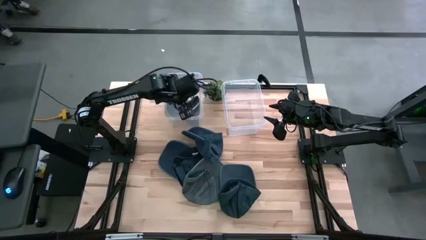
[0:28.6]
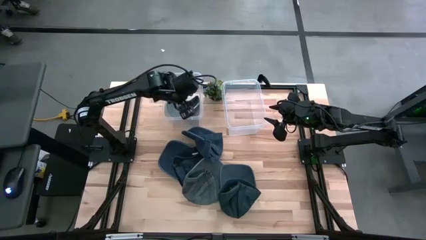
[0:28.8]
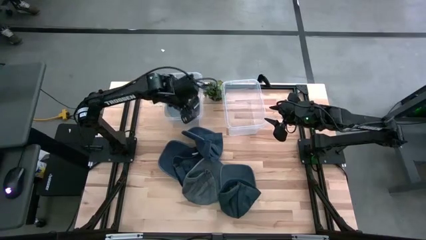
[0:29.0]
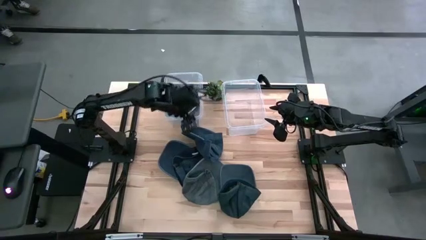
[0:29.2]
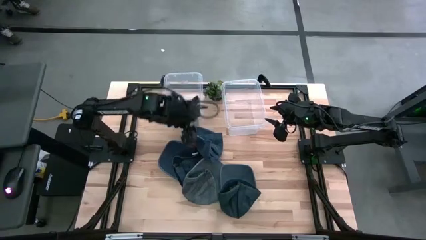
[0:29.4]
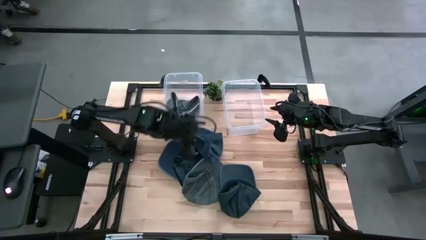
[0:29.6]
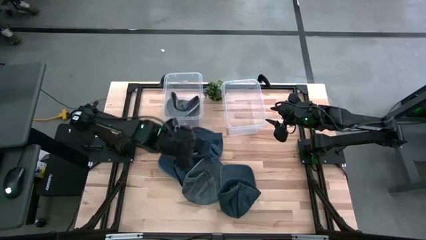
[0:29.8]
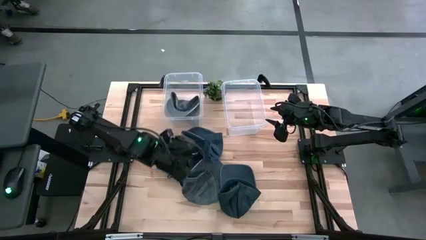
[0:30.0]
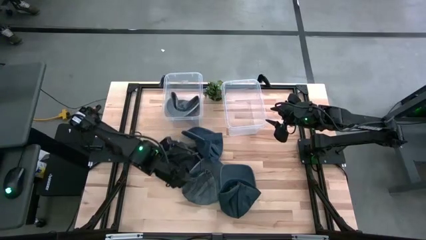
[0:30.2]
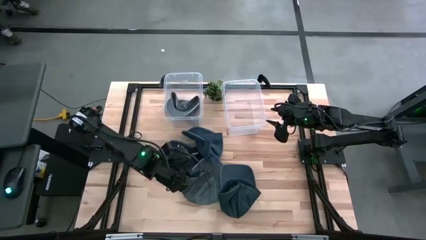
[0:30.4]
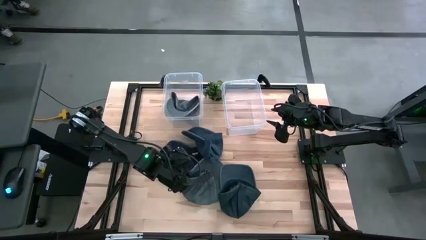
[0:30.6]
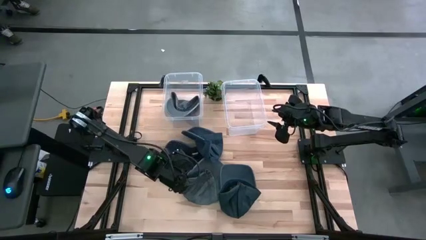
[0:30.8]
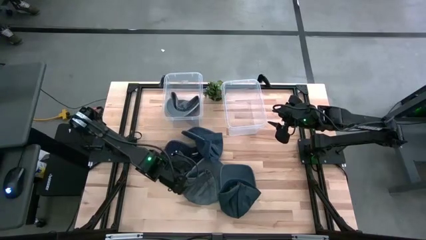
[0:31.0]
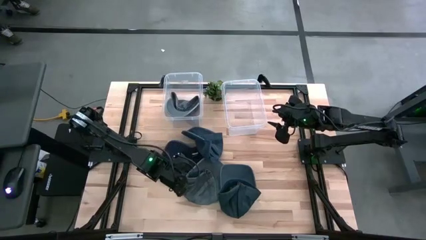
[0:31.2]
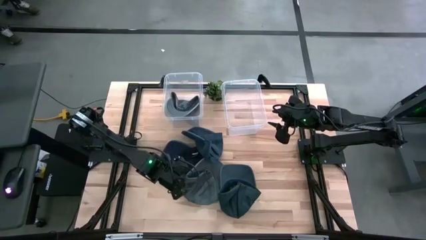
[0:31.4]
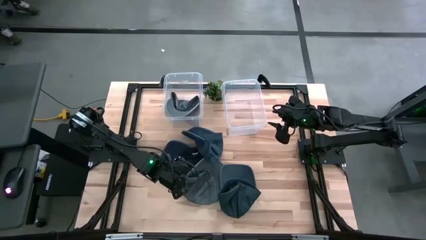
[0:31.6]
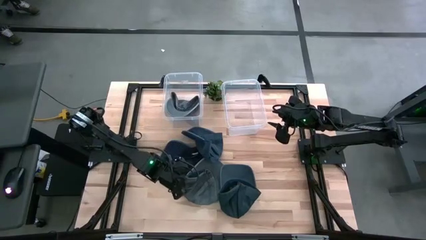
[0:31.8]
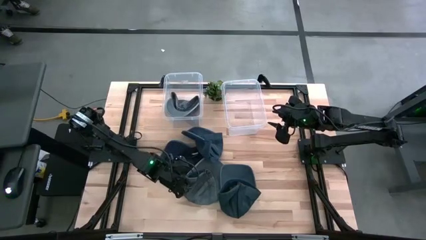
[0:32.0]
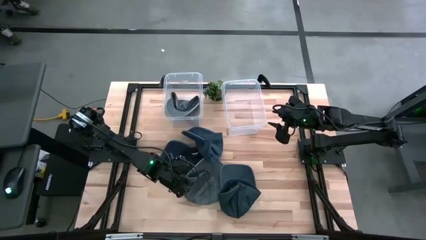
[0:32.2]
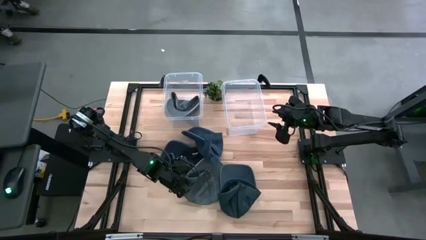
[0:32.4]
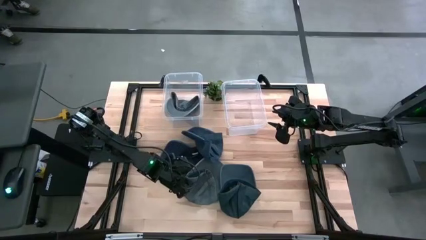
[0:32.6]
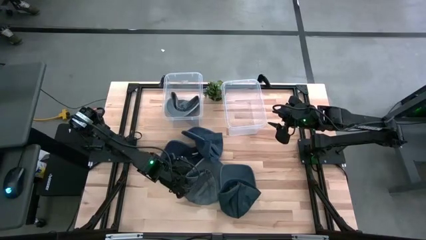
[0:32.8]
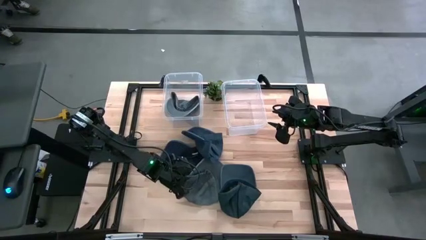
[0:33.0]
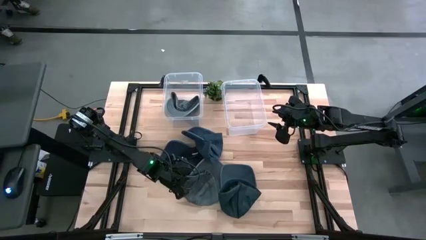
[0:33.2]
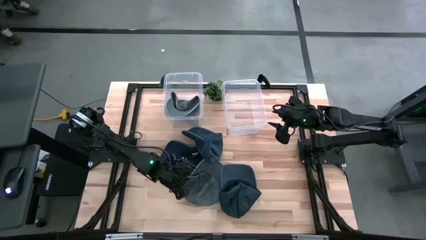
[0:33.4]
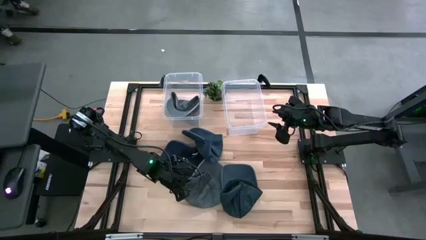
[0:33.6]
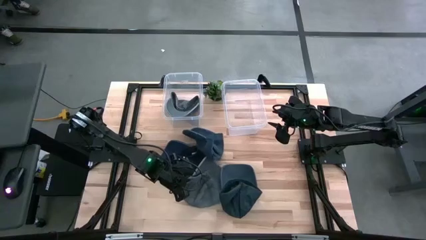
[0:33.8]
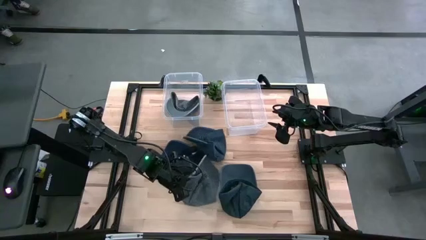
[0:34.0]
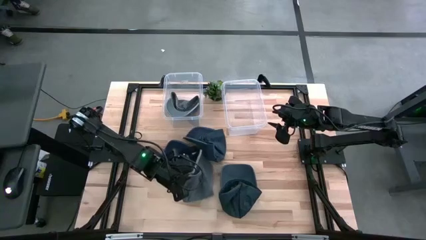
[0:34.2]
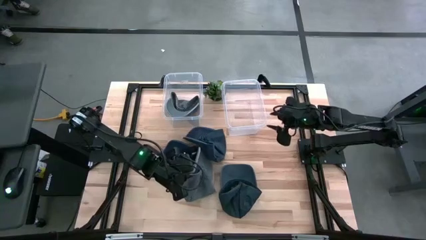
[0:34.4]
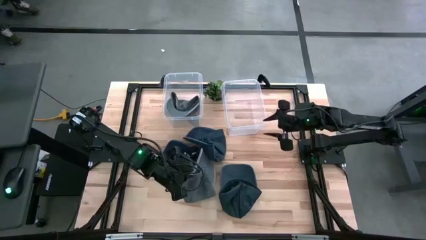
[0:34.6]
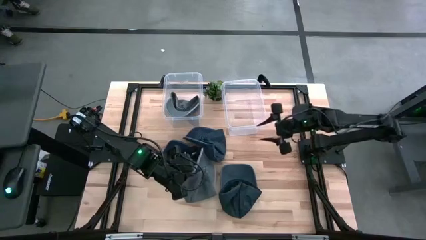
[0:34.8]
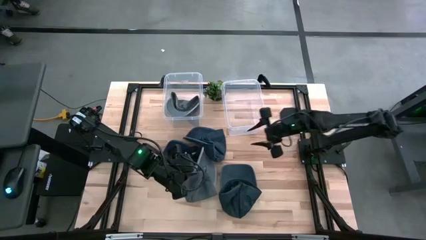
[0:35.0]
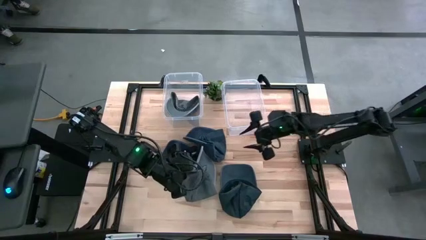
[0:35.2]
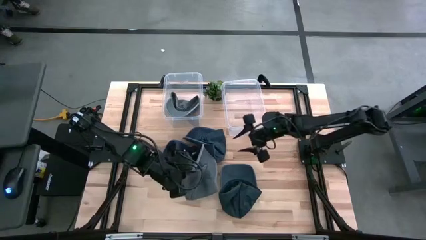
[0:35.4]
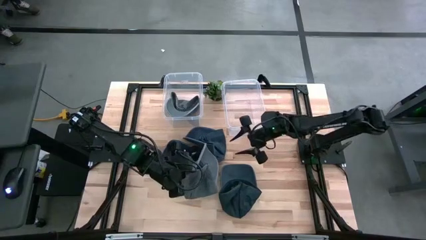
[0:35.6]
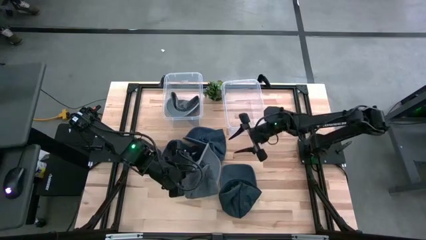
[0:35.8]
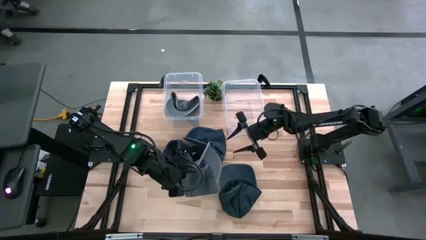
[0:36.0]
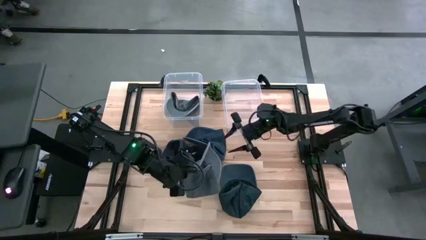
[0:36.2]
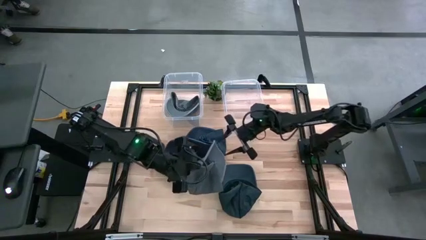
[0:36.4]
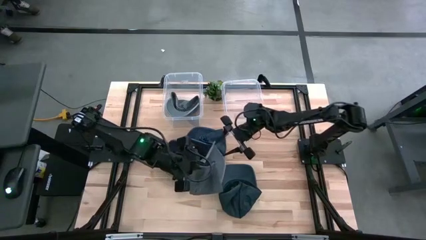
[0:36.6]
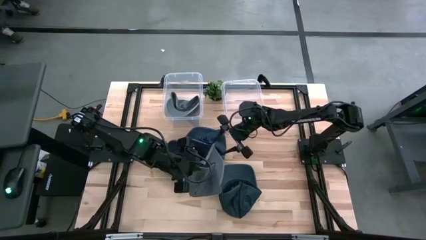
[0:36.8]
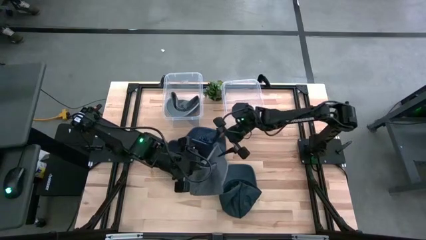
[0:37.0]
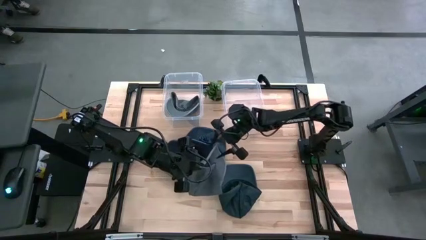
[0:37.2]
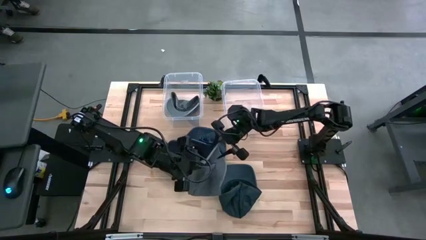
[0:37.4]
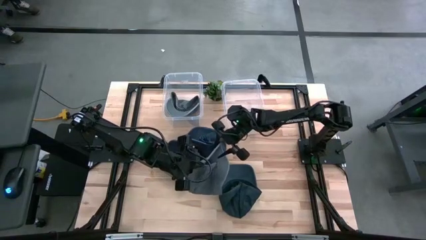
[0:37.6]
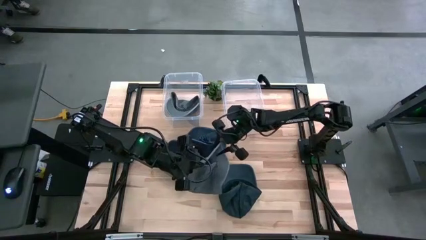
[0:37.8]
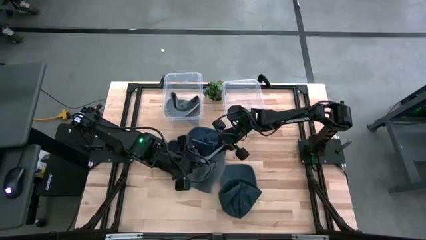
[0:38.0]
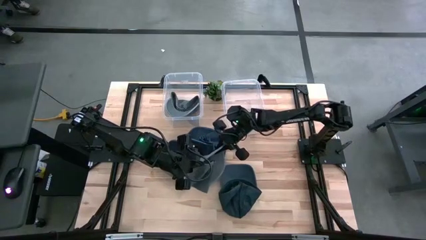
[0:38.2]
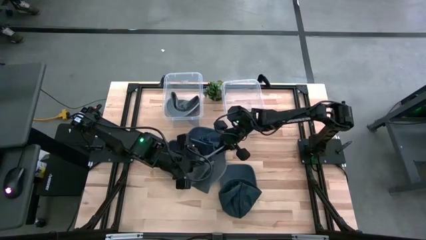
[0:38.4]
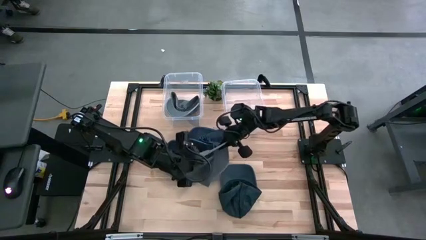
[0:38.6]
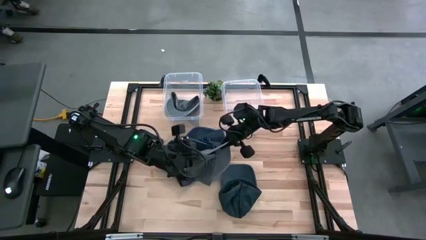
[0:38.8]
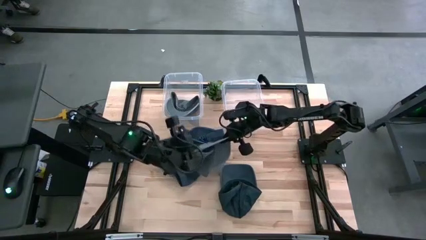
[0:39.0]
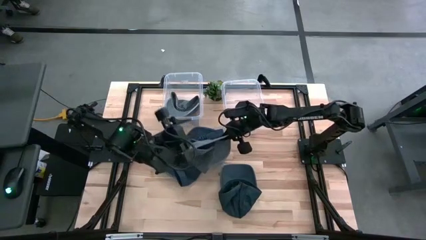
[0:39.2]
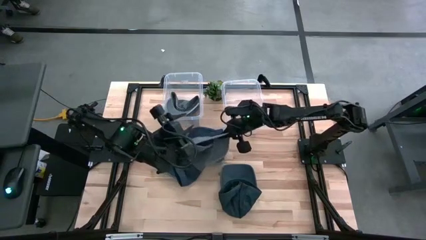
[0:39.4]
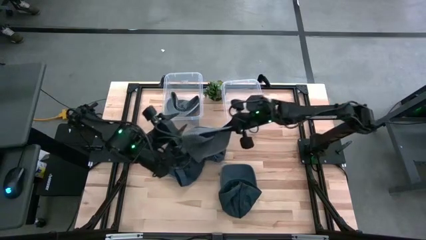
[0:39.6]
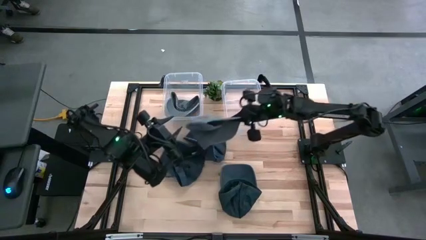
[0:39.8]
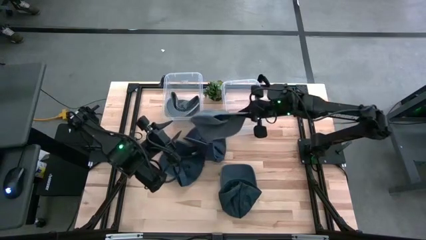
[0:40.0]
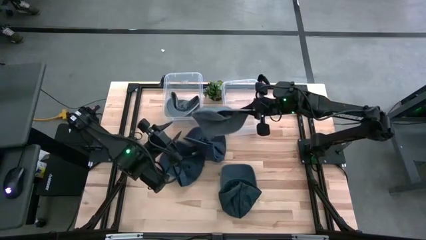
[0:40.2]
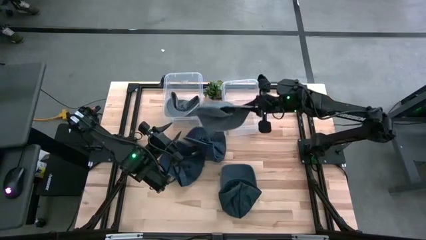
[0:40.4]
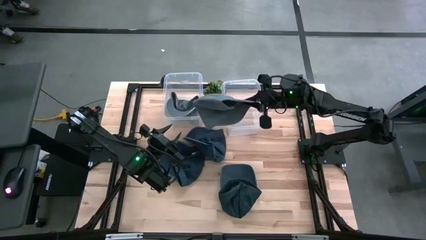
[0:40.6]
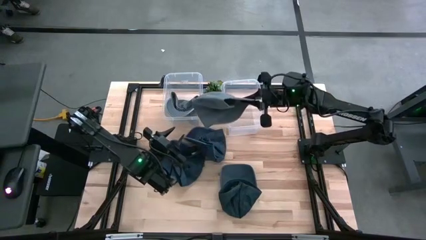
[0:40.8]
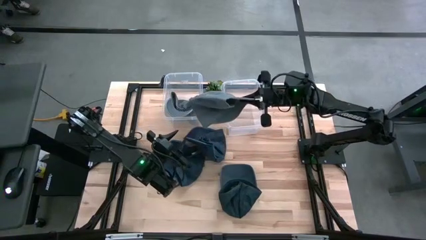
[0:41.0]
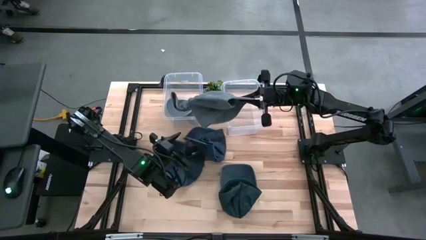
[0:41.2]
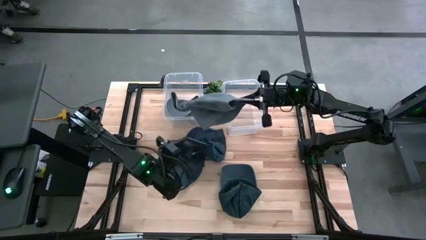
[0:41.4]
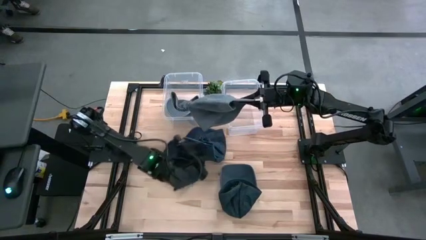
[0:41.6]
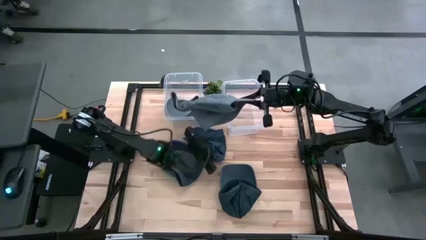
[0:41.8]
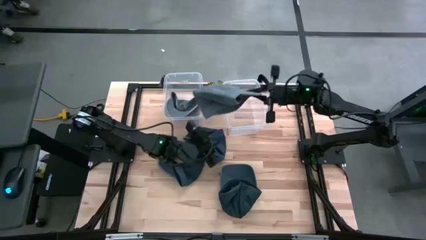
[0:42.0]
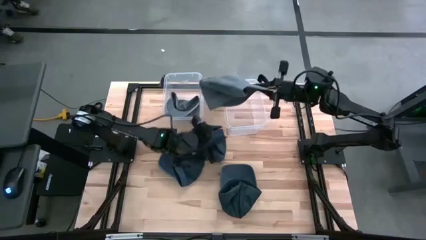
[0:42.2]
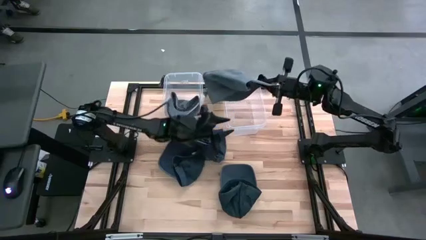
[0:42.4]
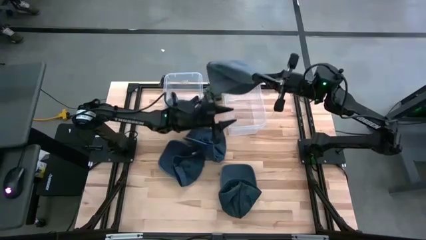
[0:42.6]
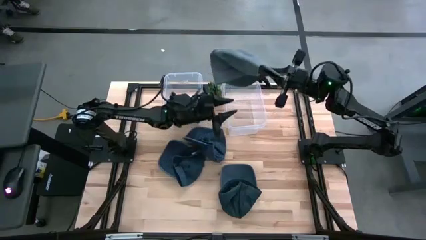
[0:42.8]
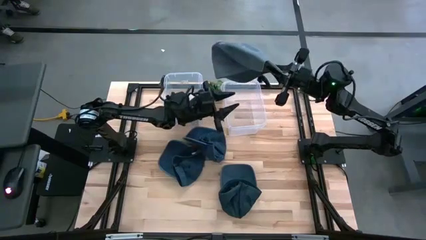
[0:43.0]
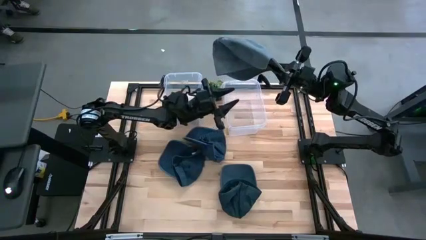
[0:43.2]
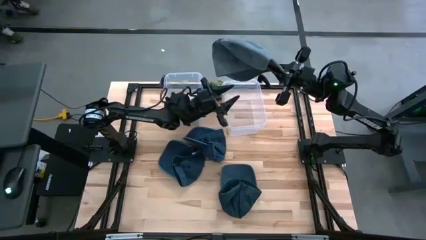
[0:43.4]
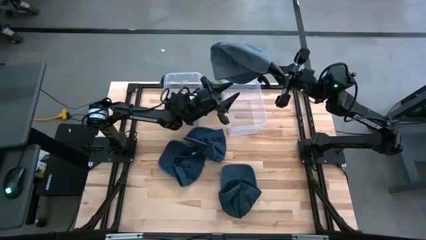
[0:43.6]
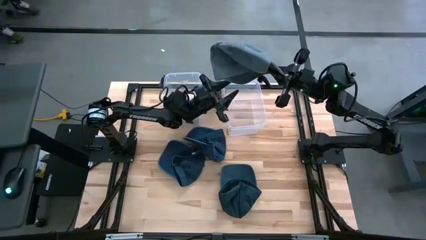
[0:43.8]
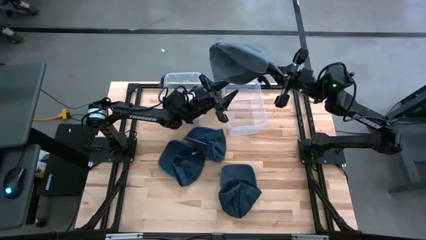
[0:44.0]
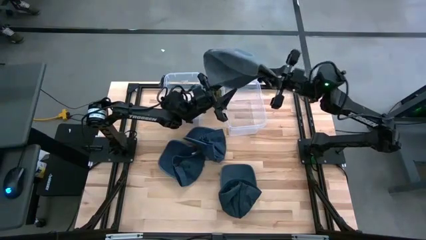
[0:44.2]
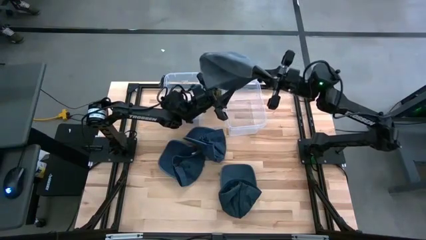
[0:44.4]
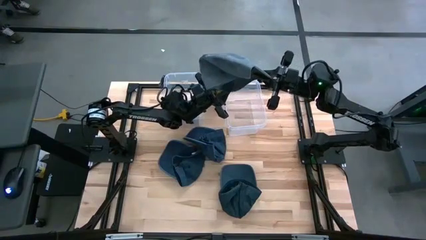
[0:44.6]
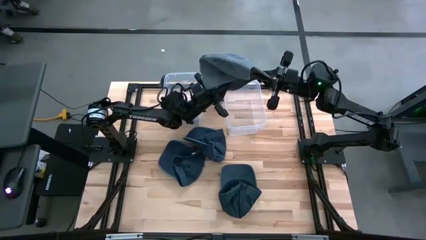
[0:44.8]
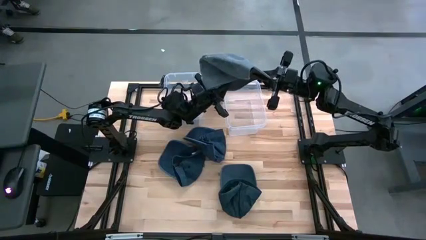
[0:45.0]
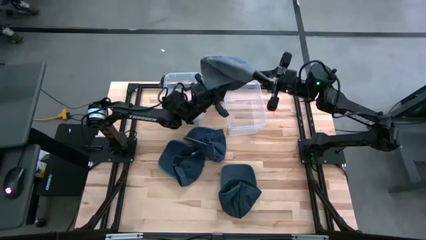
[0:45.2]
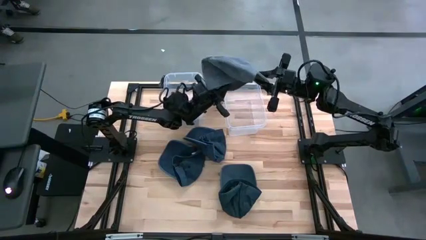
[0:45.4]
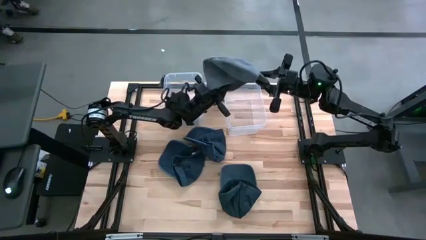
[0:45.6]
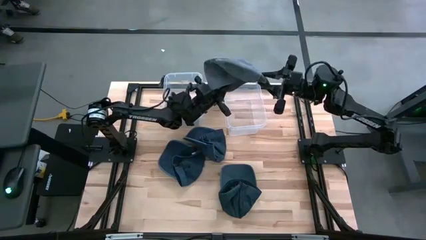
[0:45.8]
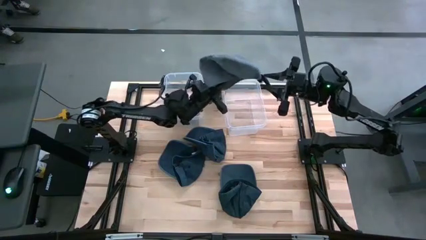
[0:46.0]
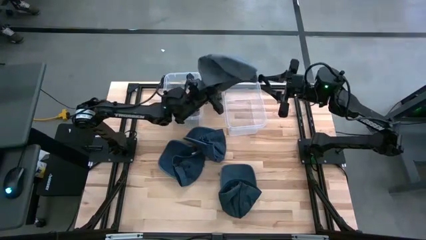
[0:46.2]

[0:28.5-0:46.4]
Task: Pick & Place hat
Put the gray cap into the left transparent bin
